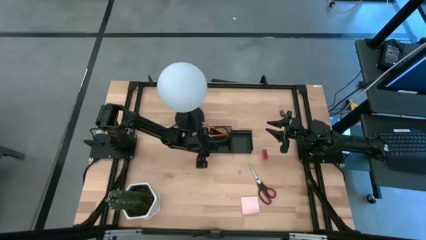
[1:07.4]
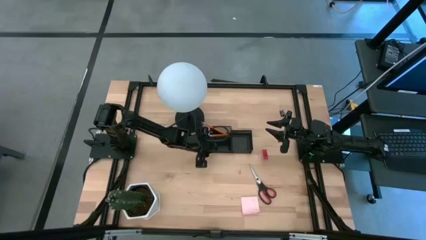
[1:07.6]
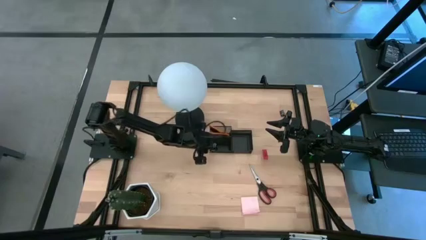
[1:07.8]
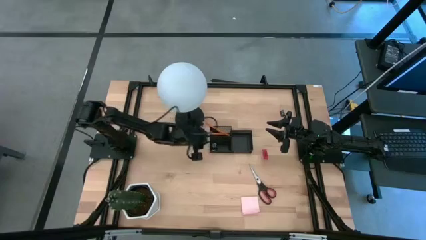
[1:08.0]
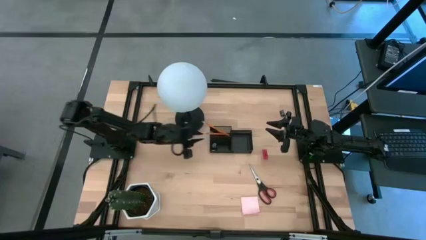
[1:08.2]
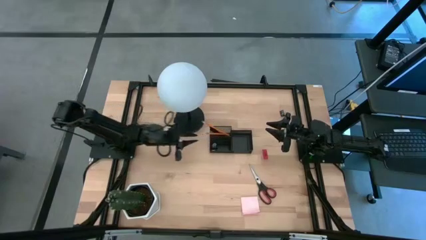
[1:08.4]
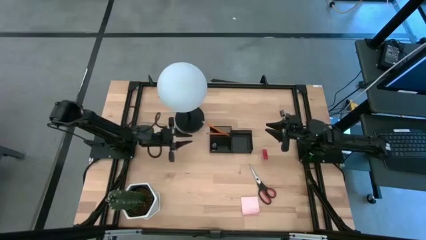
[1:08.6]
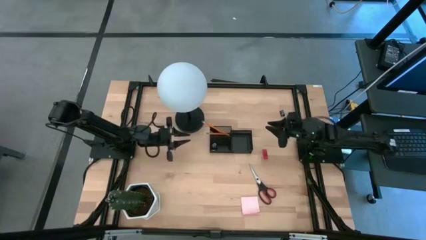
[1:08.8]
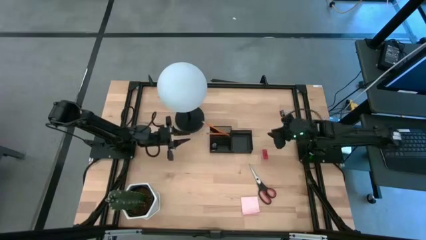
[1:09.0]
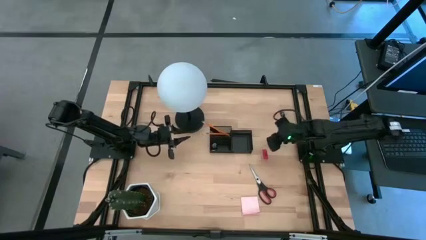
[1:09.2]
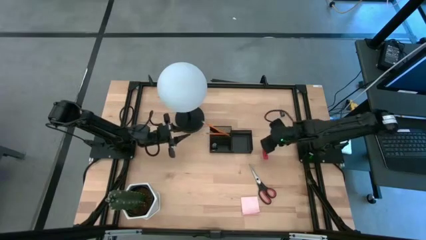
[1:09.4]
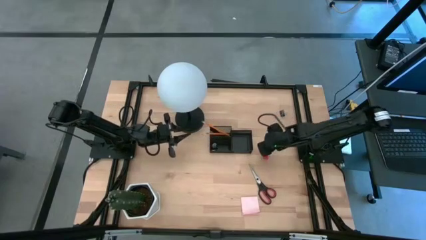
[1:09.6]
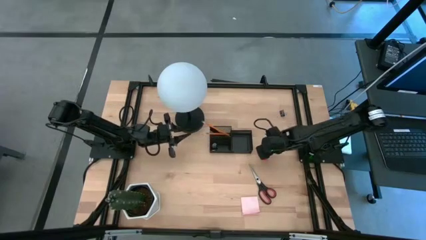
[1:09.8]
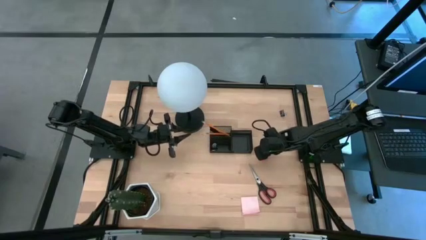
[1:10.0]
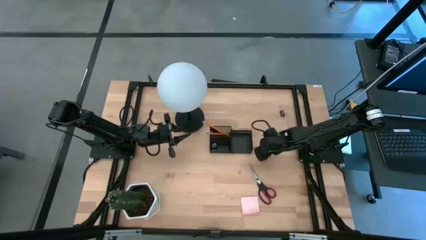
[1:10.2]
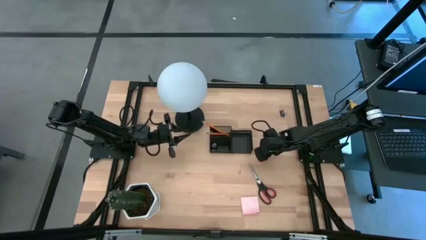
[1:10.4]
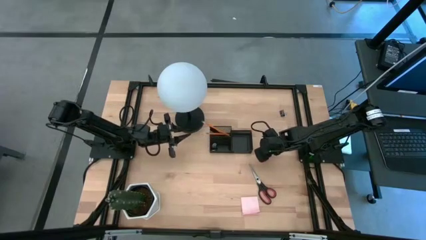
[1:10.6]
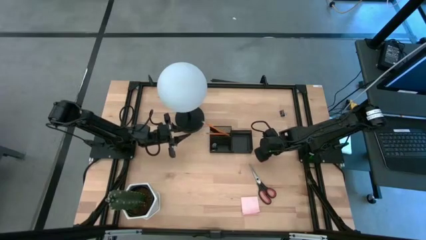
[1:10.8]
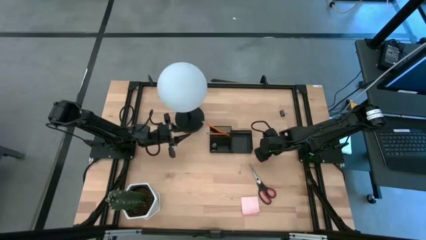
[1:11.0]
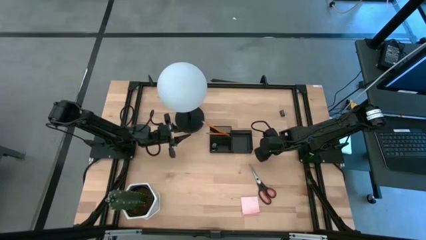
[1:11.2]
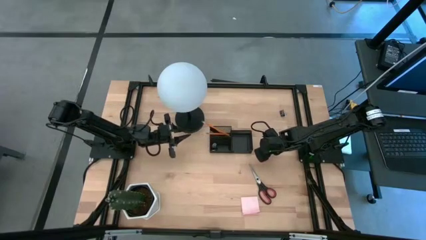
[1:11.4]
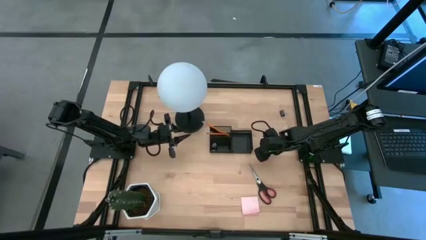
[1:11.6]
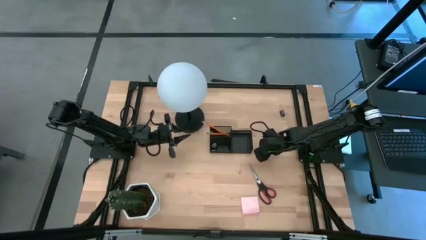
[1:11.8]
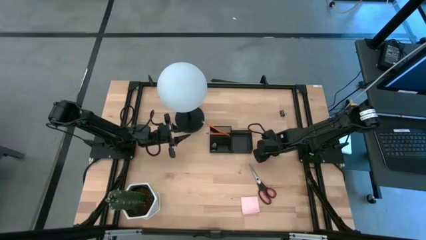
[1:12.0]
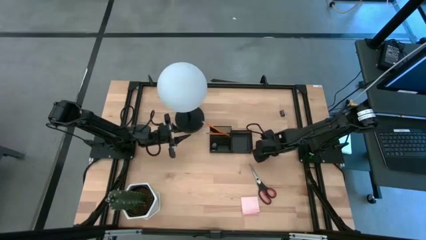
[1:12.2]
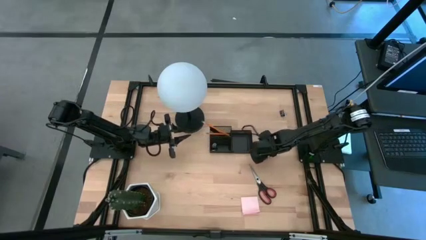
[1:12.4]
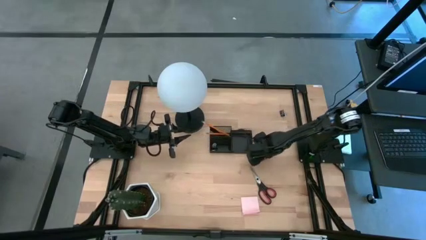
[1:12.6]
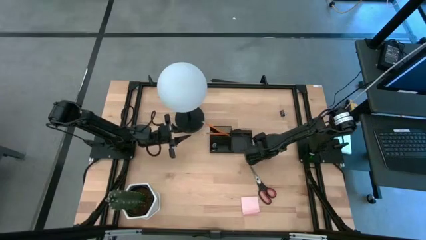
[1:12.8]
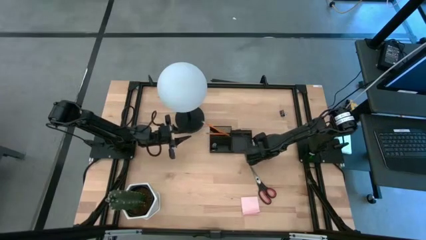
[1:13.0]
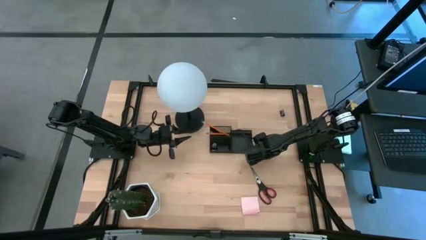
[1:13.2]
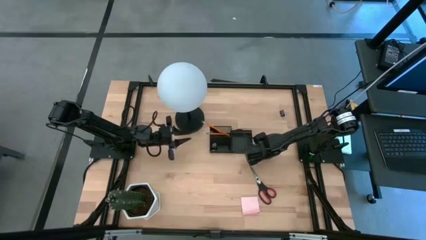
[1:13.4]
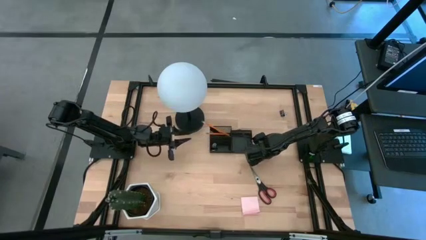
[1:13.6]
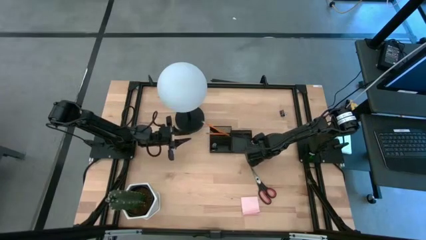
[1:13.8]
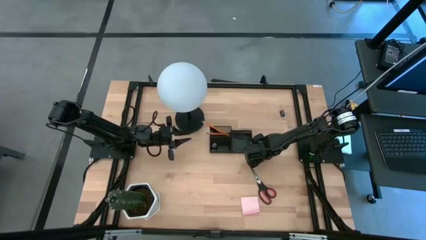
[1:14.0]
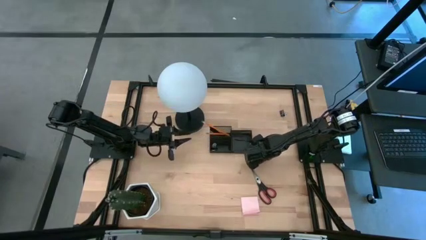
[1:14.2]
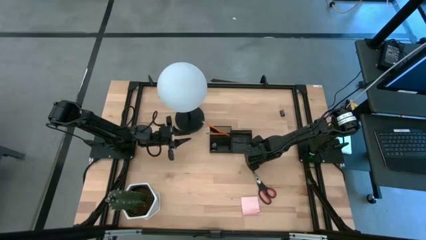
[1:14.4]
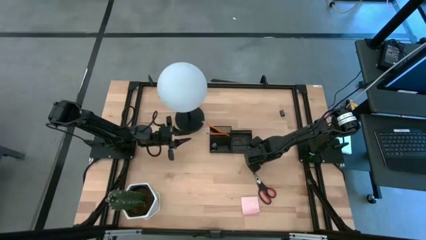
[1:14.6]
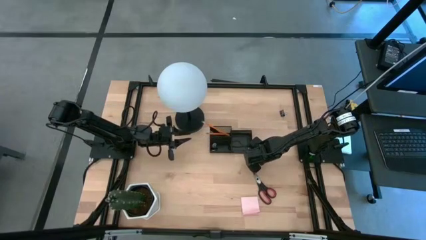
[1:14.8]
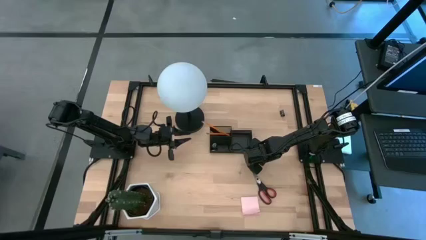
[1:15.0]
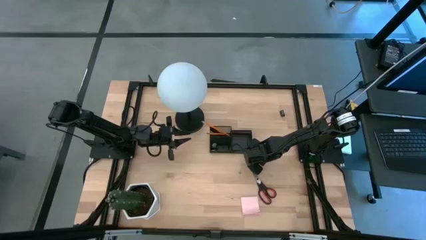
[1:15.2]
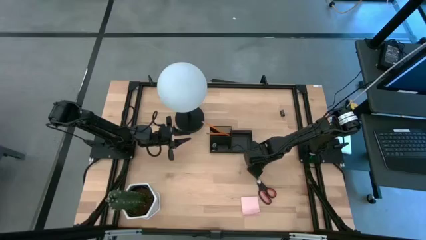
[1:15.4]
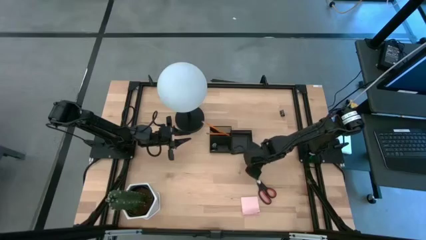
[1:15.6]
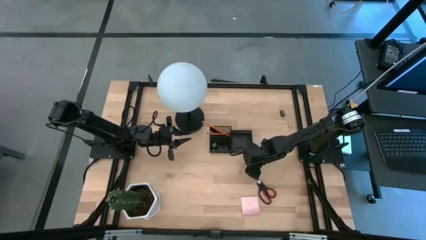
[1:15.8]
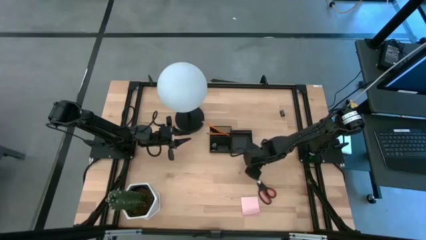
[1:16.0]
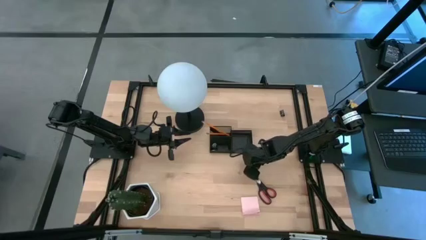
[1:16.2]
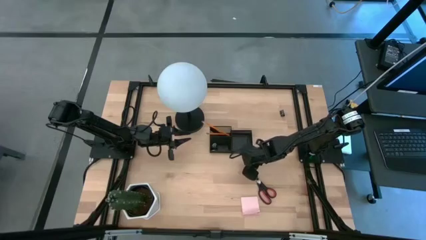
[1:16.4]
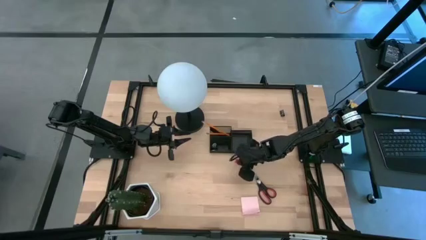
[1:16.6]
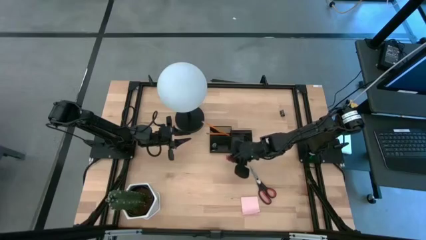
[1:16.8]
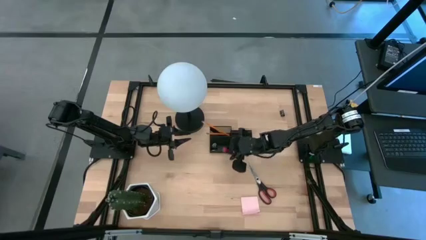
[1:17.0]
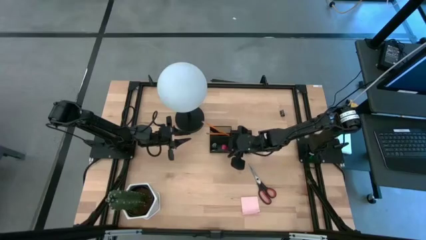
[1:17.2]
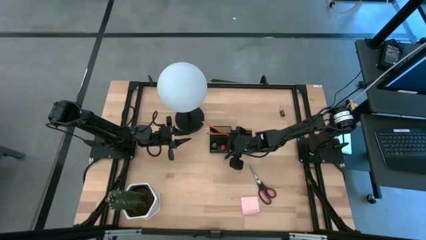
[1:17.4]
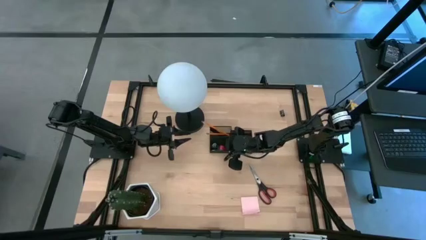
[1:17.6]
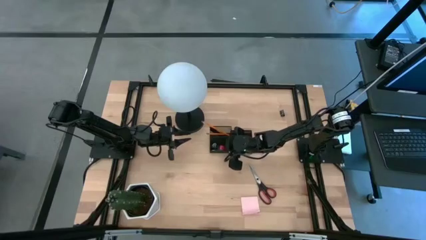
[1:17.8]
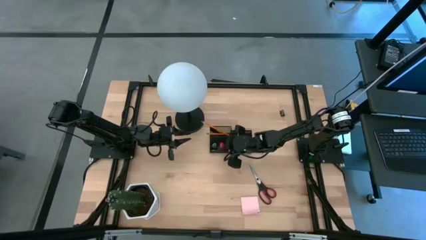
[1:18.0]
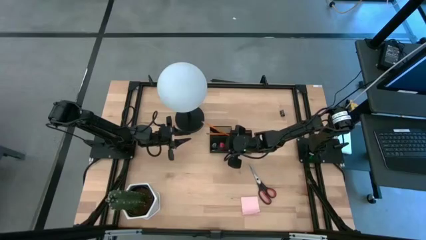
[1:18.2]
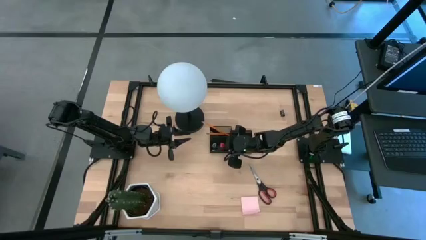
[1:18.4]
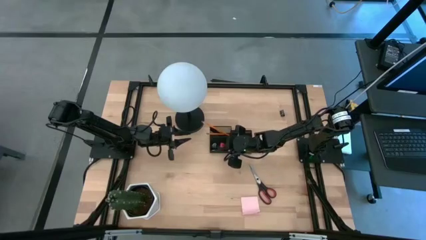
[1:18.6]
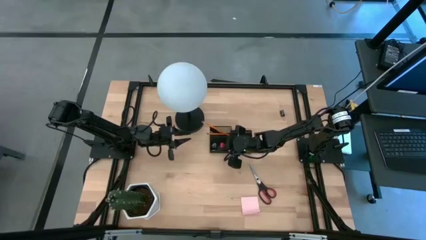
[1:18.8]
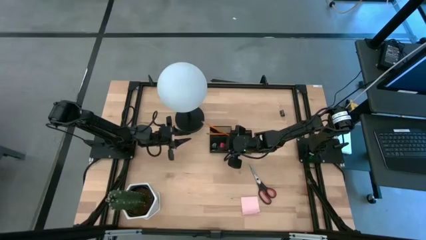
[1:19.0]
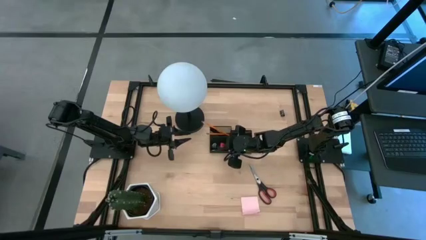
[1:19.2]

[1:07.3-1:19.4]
Task: Pick and place office supplies into organizer
Put the red eraser into the black desk organizer

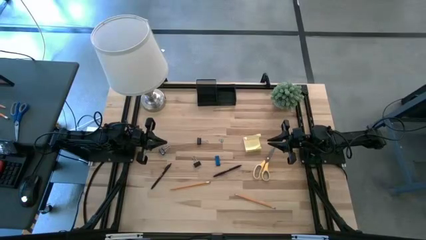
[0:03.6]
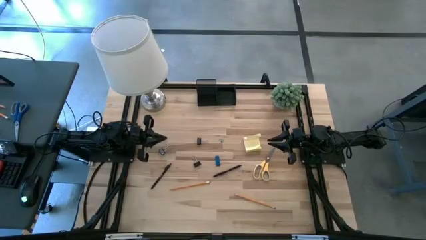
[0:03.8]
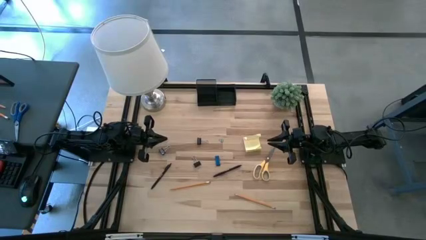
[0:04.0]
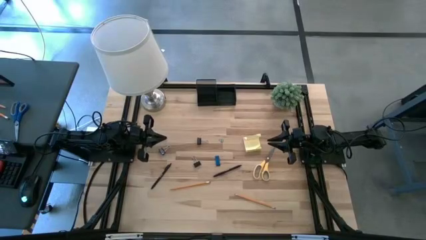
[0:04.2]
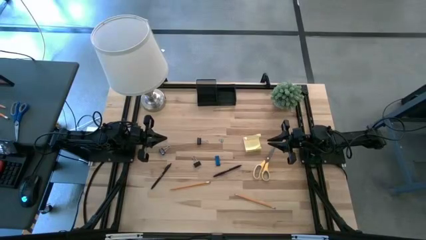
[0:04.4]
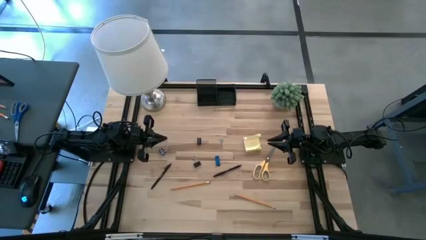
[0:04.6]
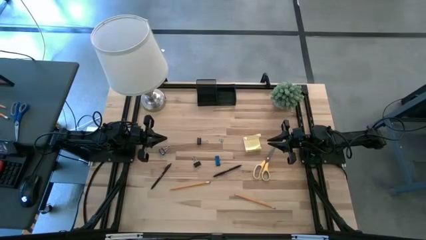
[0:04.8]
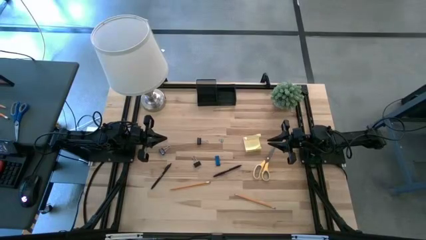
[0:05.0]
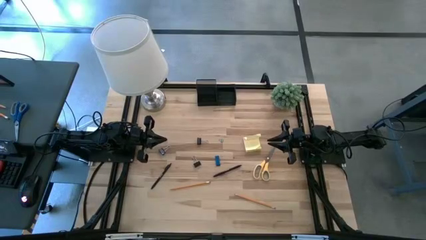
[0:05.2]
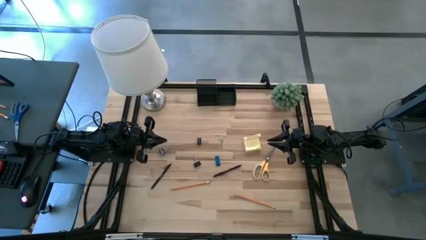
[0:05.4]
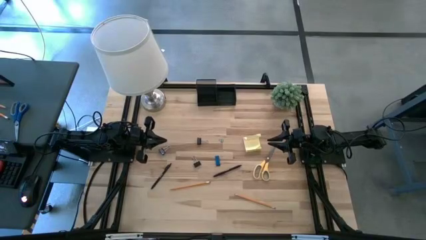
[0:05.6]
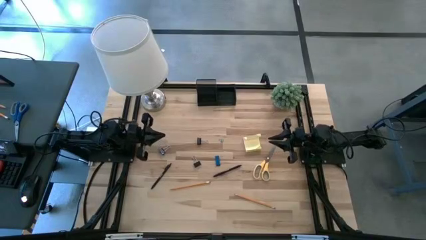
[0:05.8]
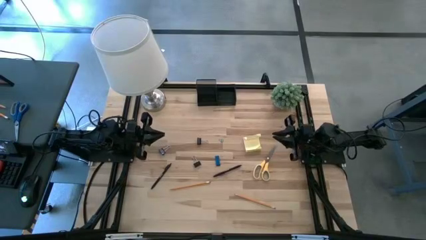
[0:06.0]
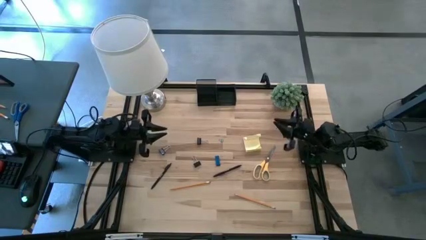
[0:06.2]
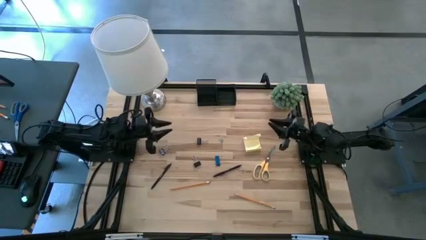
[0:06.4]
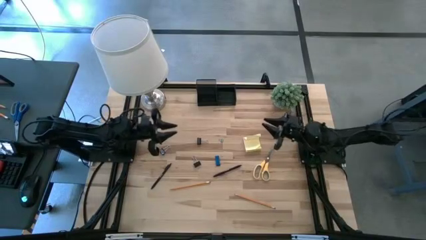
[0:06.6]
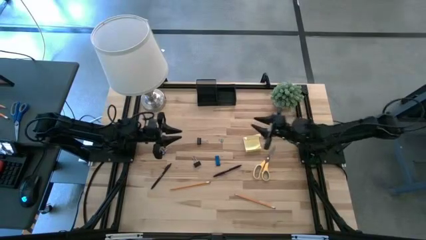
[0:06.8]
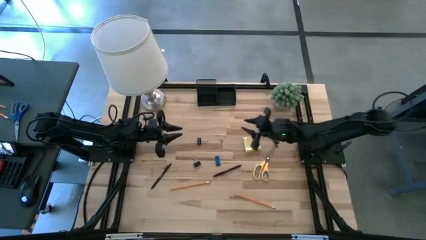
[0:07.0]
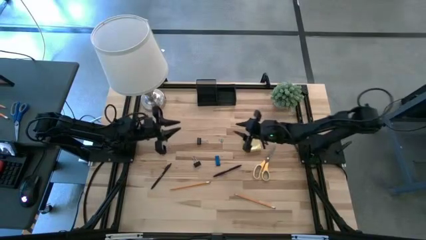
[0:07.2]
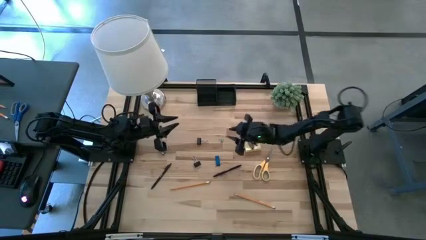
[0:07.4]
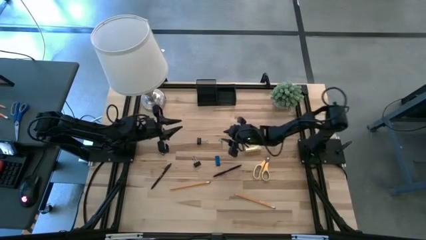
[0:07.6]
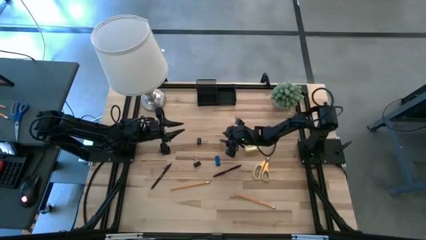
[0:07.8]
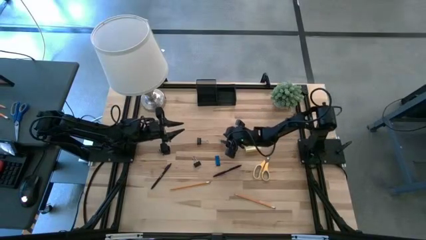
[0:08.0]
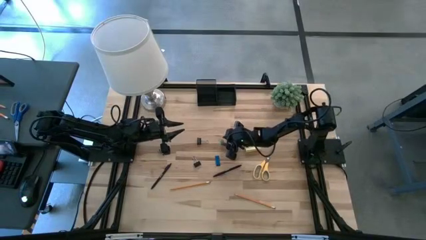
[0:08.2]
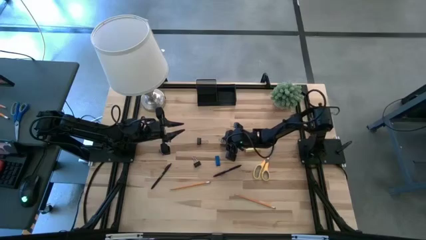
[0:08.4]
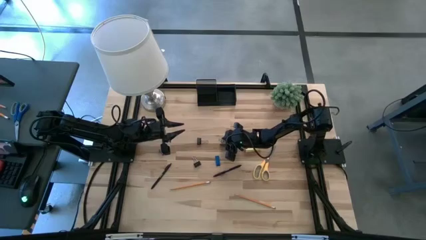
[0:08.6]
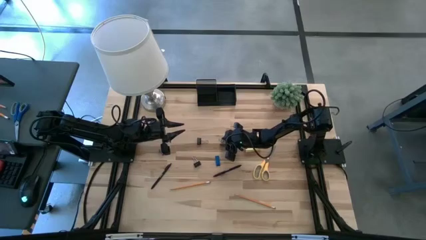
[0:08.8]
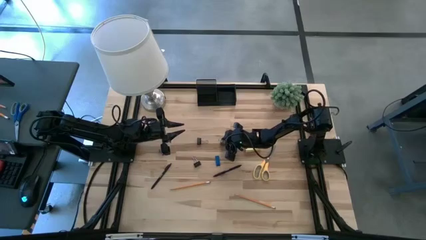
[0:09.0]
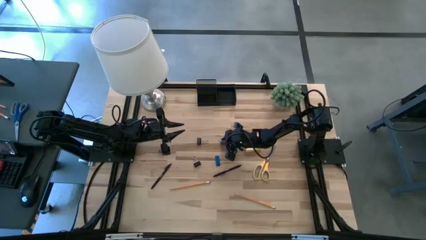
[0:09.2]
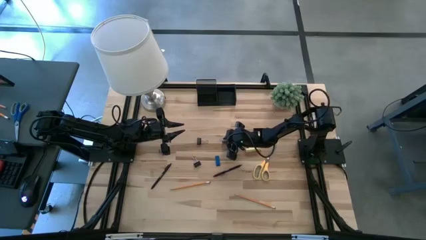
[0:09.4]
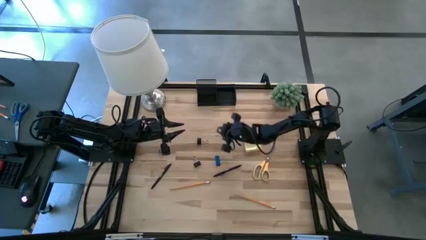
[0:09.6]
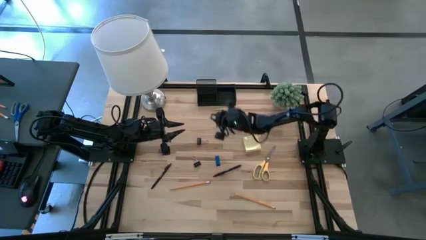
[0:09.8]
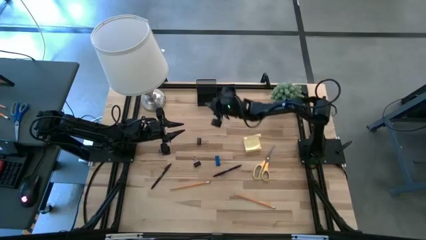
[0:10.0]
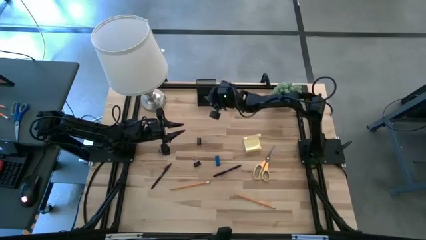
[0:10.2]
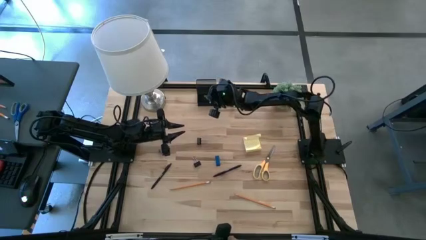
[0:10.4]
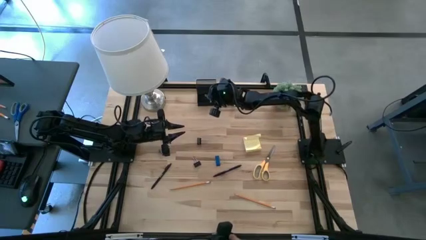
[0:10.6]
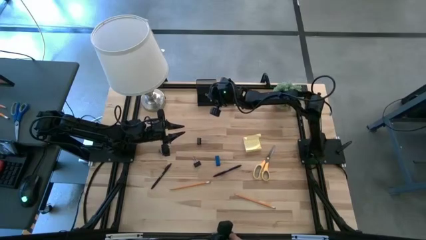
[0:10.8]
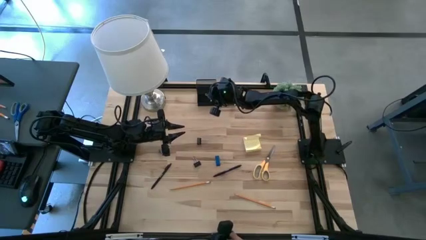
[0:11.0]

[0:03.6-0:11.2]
Task: Pick and place office supplies into organizer
Put the blue binder clip into the black desk organizer
